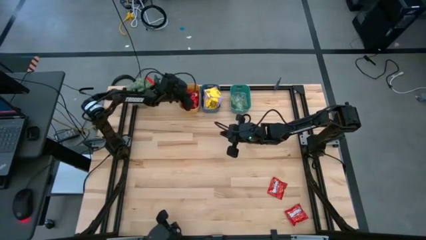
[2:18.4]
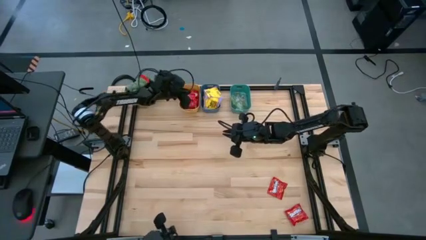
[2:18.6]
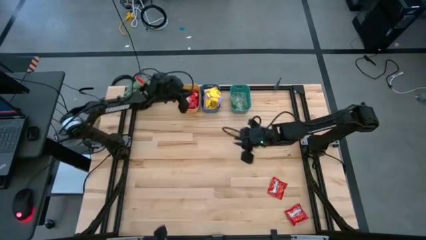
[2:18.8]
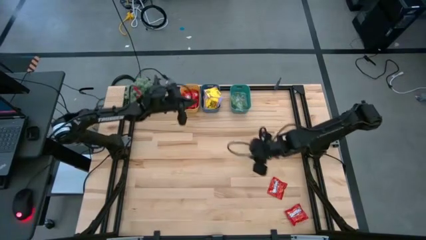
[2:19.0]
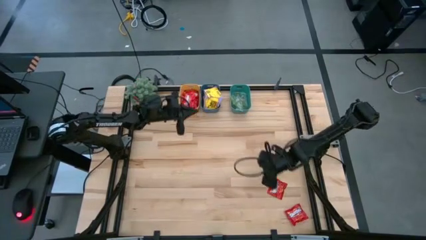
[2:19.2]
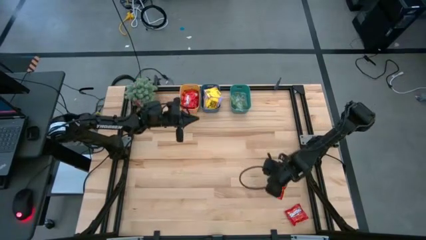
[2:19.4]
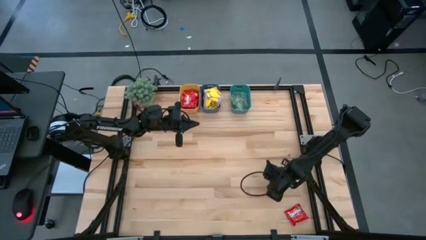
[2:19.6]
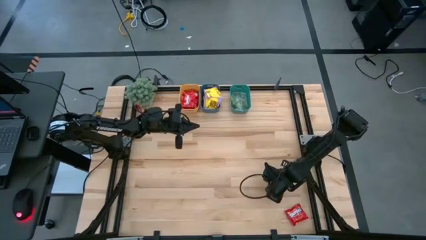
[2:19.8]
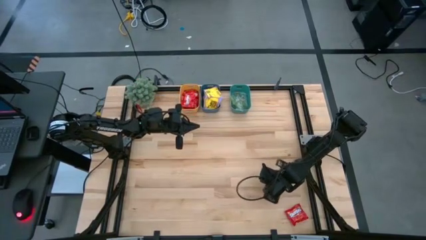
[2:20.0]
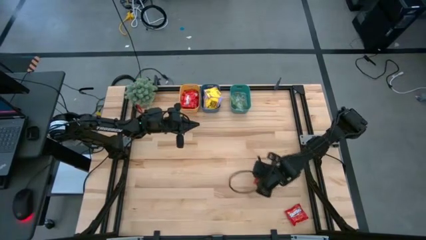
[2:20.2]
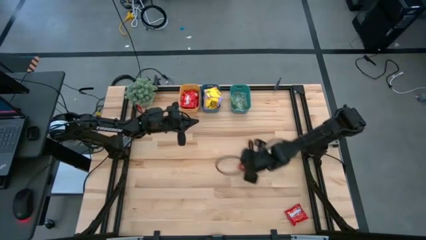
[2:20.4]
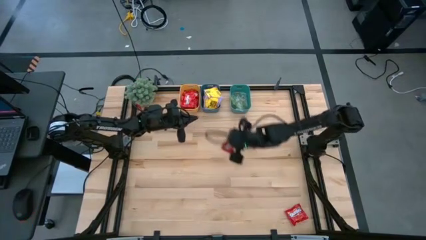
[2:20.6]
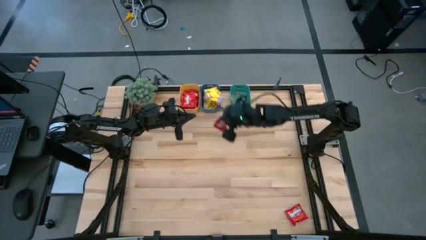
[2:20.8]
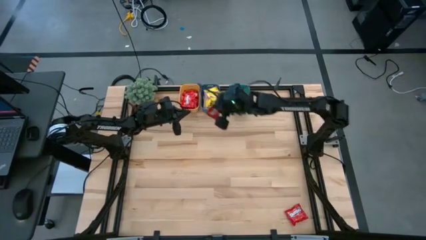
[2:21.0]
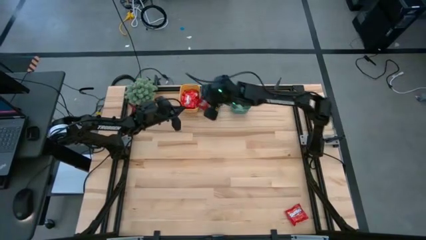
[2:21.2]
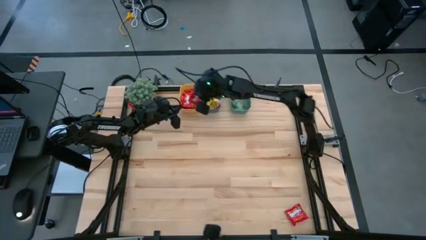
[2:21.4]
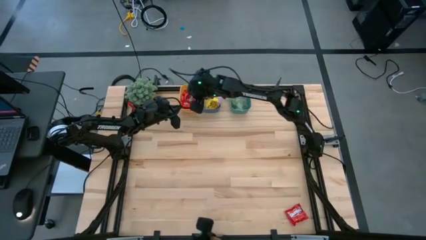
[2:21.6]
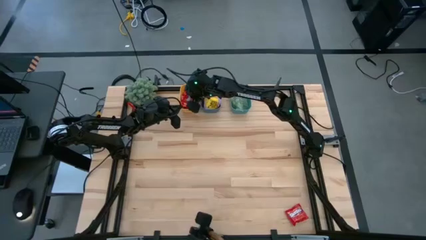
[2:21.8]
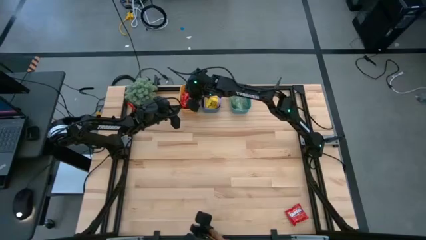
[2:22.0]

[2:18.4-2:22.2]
Task: Sort candy
Put the red candy pack into the yellow bin

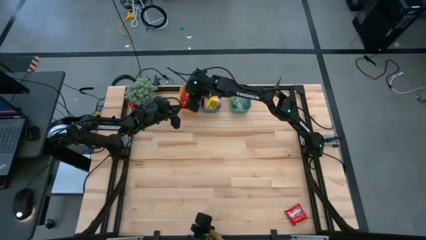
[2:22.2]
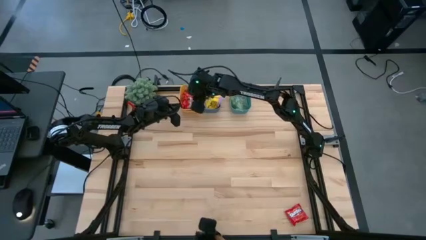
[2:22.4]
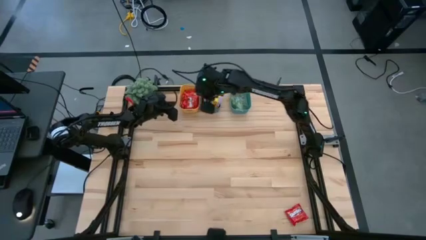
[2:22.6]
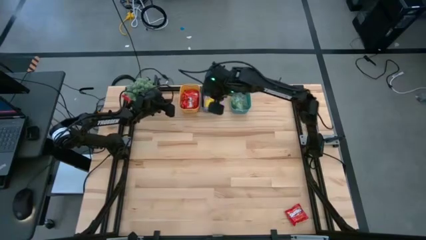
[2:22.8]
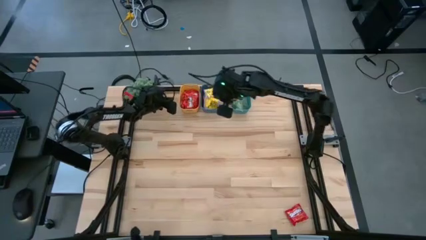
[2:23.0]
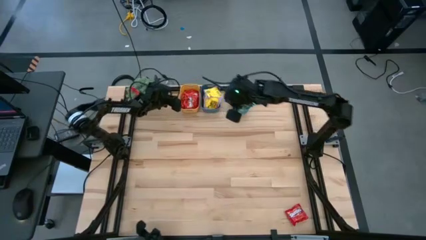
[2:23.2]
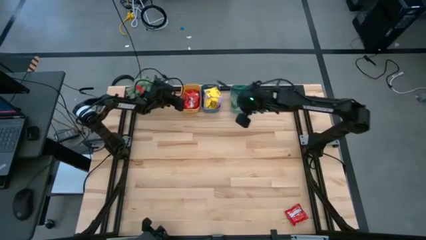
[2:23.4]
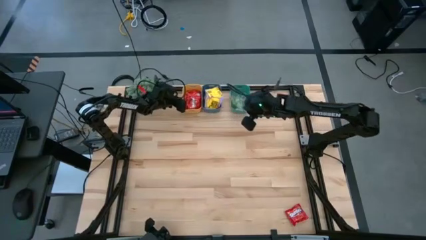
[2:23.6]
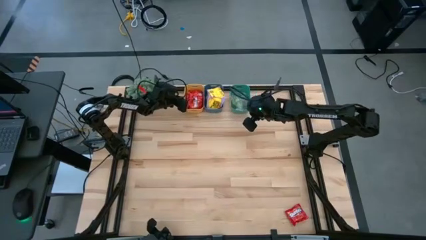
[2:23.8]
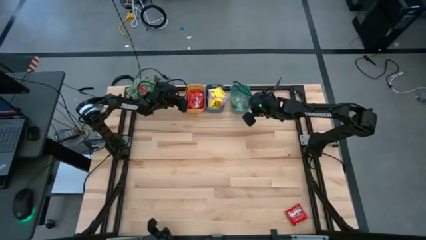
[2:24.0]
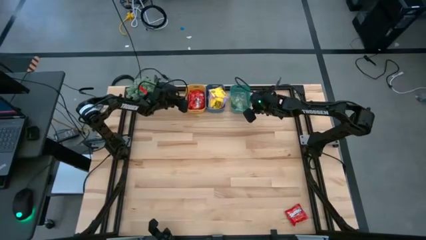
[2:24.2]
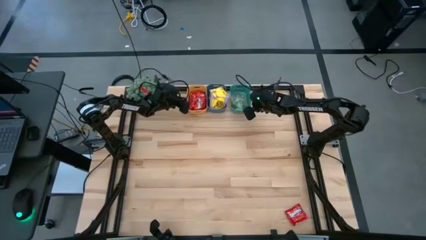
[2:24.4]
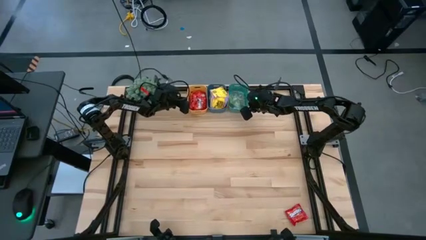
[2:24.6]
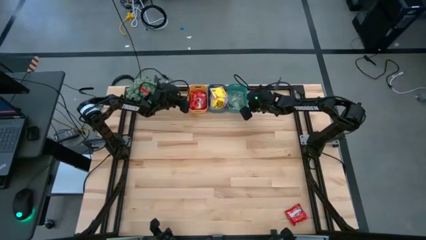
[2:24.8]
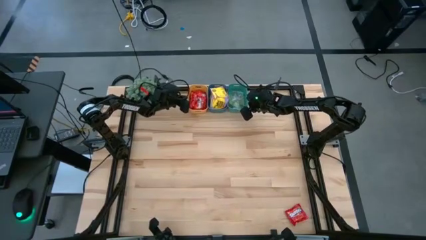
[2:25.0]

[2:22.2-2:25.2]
Adjust the bins

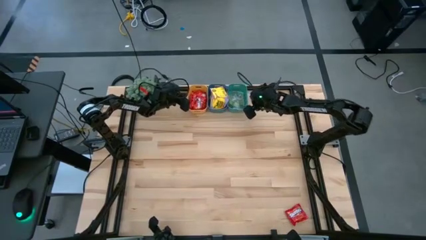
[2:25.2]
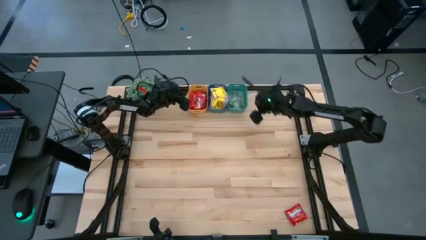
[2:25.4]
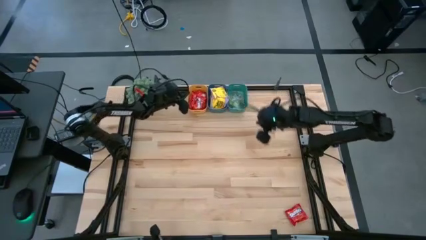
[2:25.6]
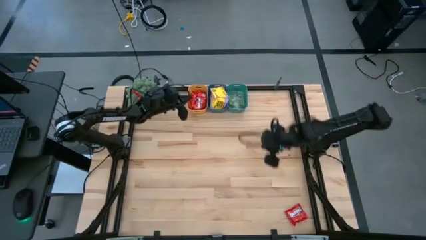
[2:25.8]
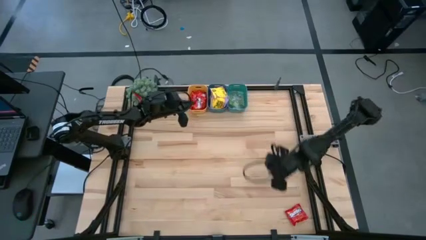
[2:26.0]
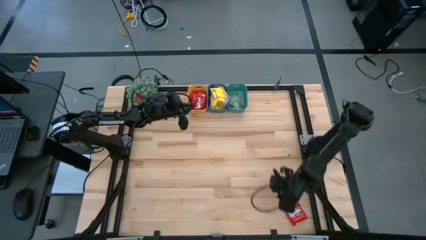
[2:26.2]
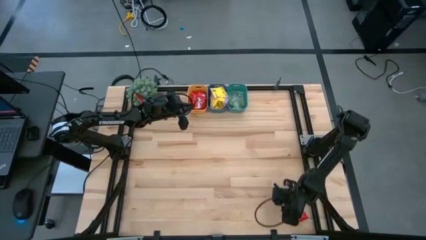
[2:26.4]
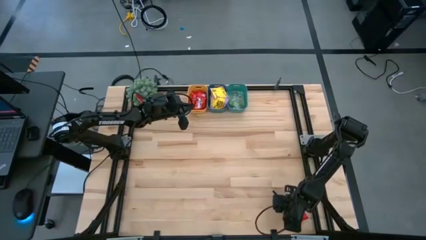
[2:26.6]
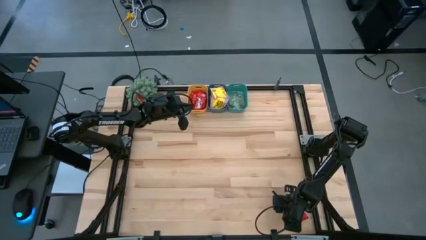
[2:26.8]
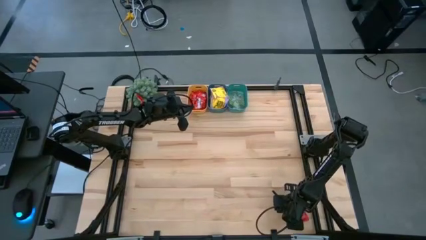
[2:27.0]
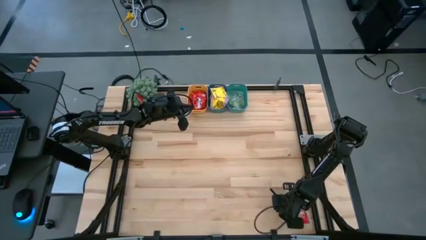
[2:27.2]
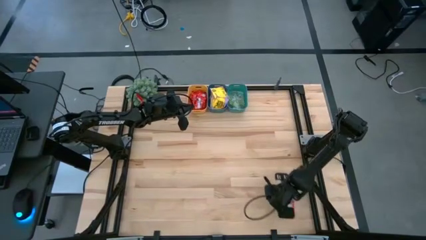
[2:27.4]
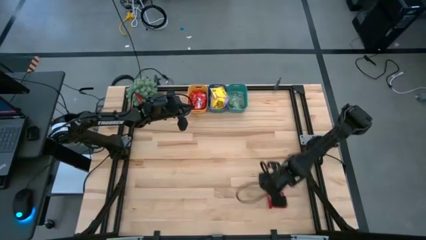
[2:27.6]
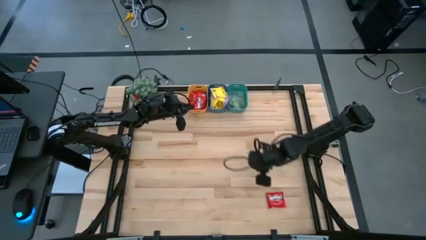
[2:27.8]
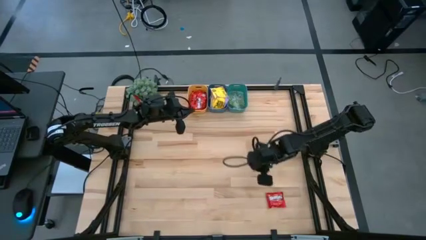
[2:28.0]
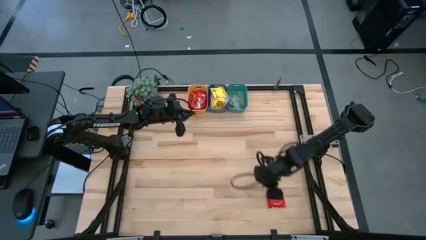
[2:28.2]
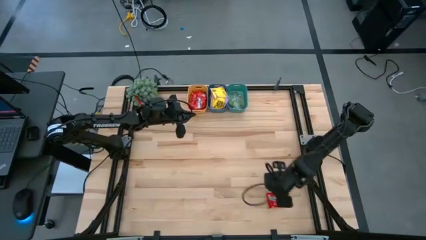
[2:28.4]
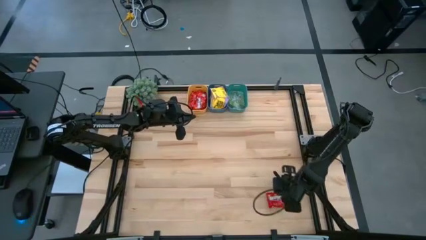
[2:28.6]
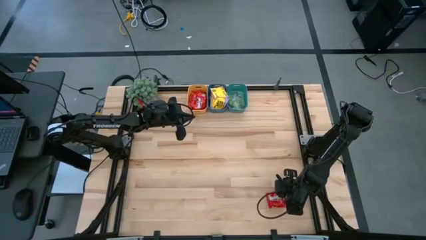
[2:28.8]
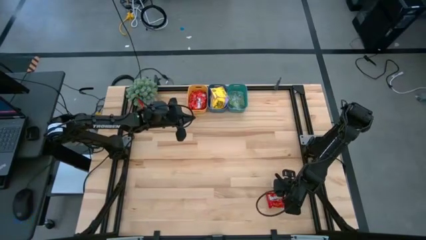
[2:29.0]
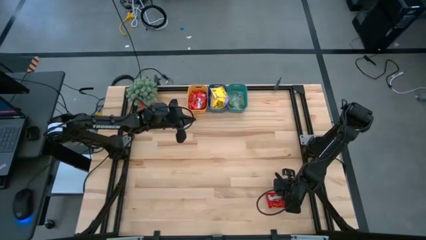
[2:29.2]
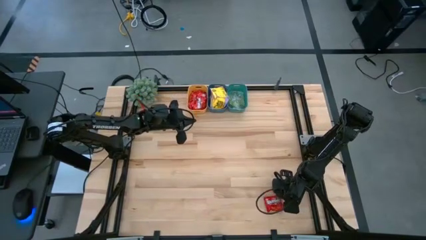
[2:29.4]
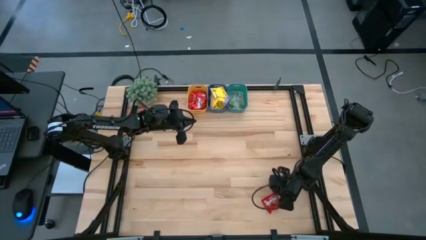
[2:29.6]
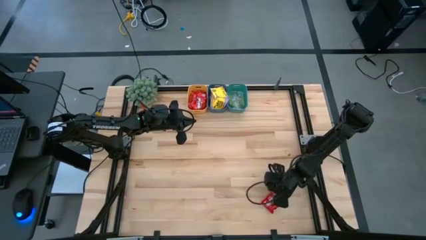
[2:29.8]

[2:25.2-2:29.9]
Put the red candy pack into the yellow bin

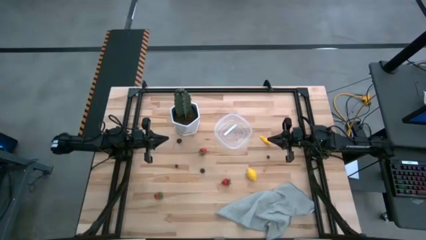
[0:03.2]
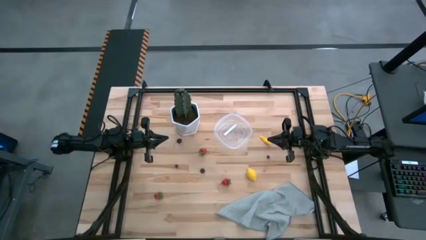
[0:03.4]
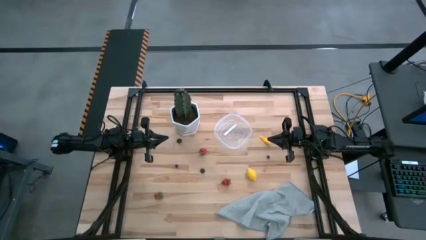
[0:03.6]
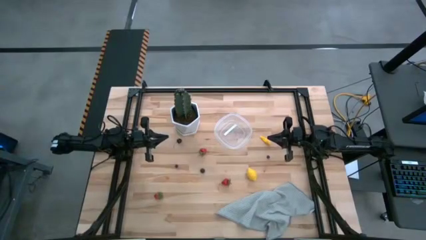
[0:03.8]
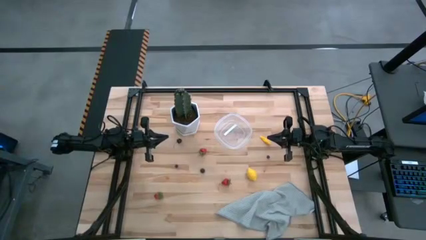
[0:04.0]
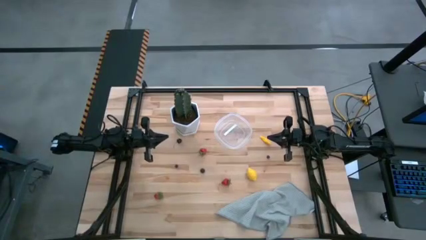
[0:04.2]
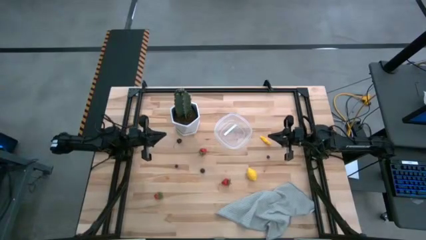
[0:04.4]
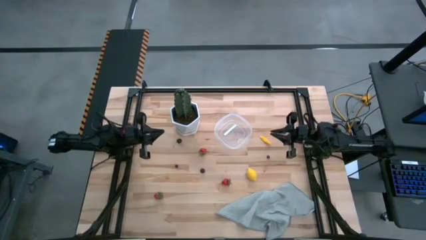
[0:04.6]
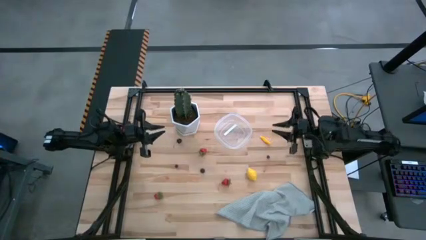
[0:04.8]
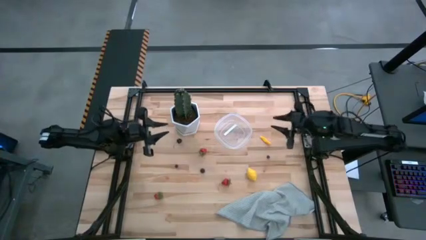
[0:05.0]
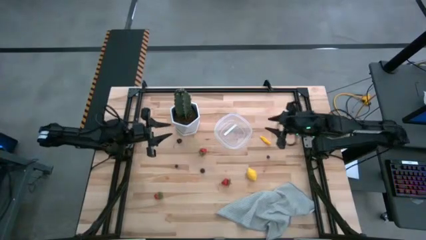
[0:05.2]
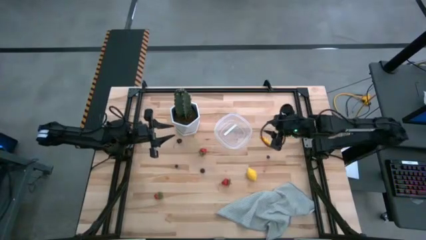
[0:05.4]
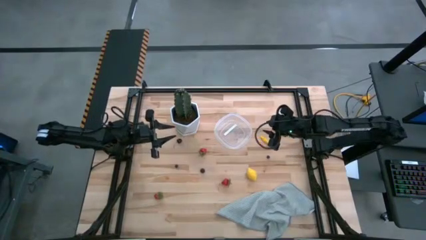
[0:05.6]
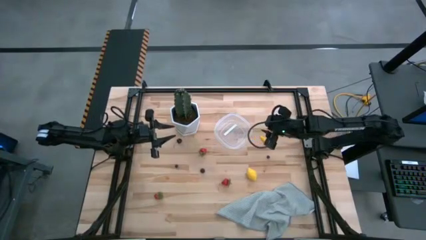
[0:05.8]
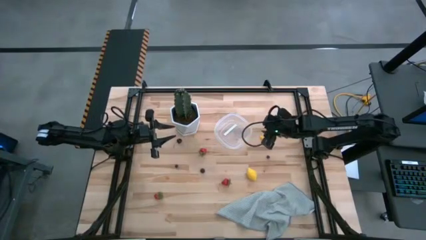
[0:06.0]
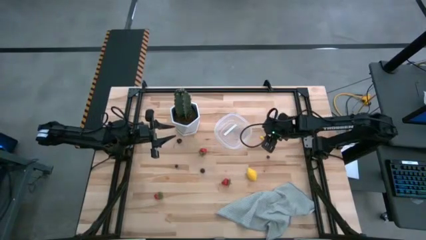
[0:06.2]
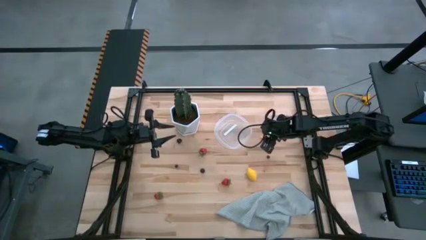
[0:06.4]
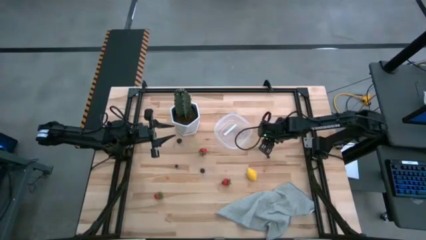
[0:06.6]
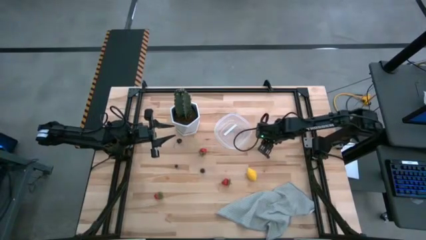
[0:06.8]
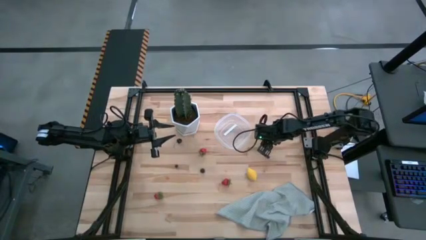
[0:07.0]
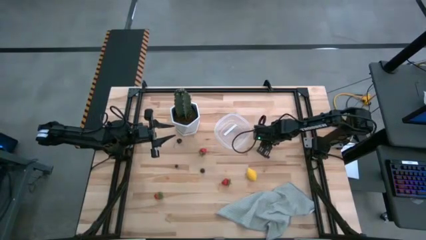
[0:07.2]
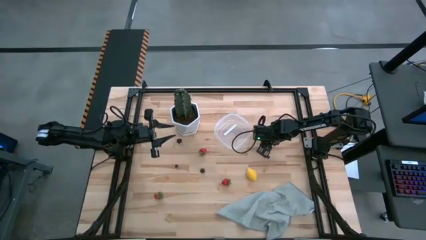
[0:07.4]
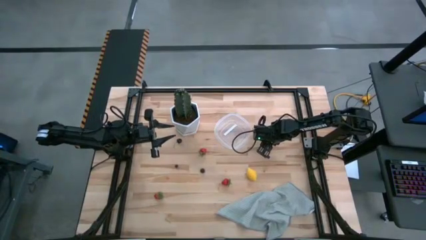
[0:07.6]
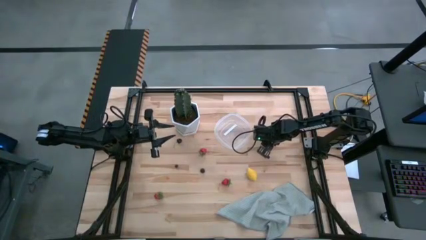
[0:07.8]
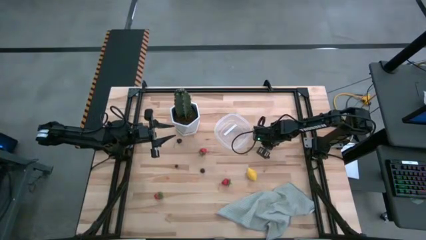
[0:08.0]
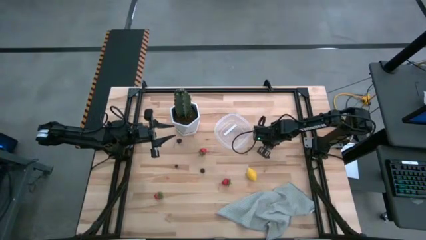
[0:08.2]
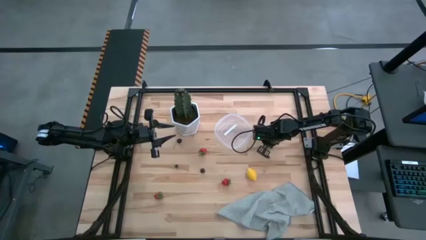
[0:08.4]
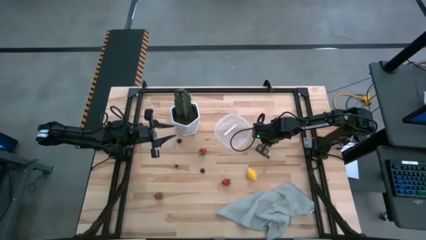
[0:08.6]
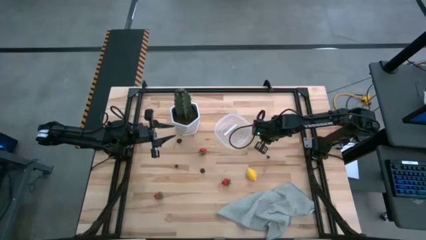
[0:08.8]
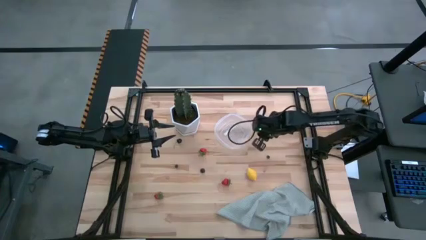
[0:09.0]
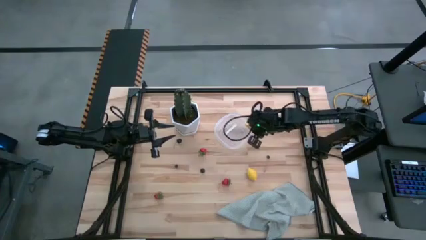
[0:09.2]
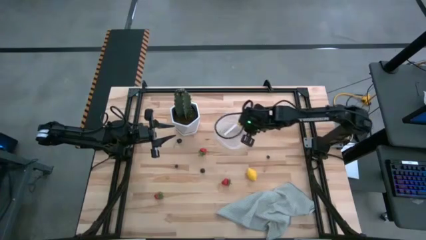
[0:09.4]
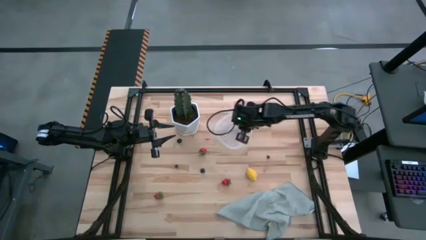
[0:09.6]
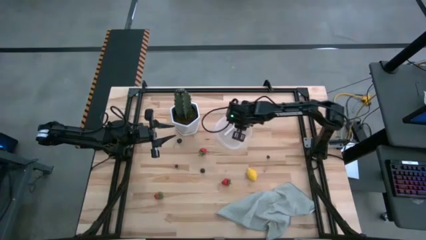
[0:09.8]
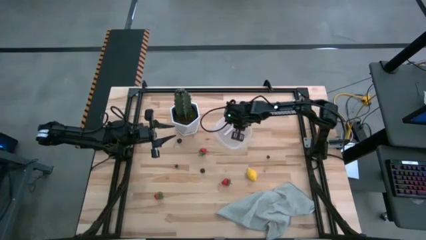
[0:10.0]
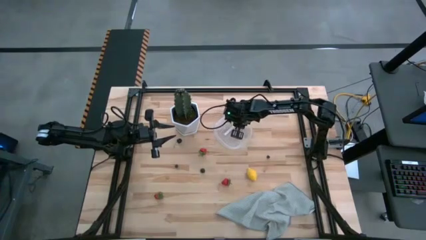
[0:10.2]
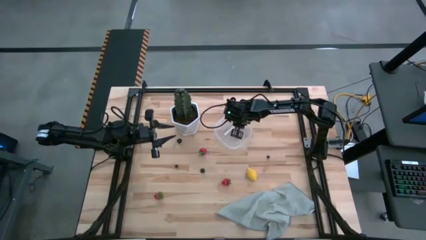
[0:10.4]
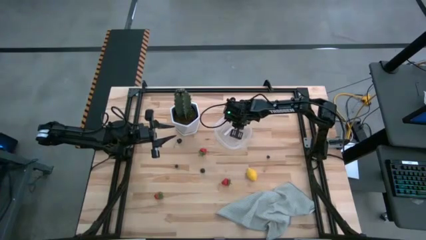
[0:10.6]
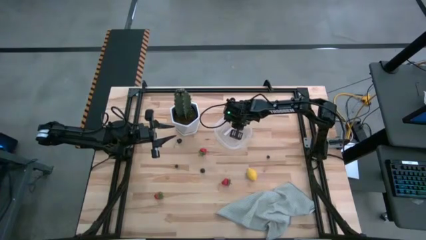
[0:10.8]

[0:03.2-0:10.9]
Task: Pick and placing Produce into tupperware
Put the yellow corn into the transparent container
